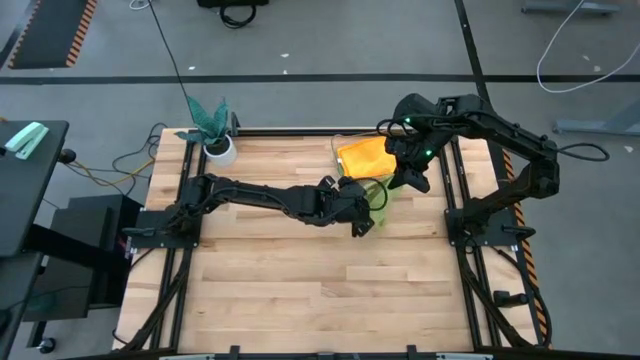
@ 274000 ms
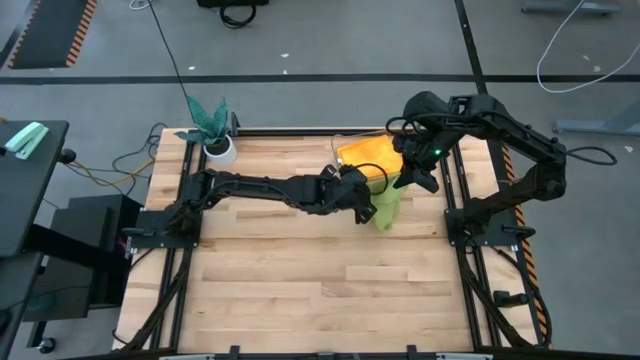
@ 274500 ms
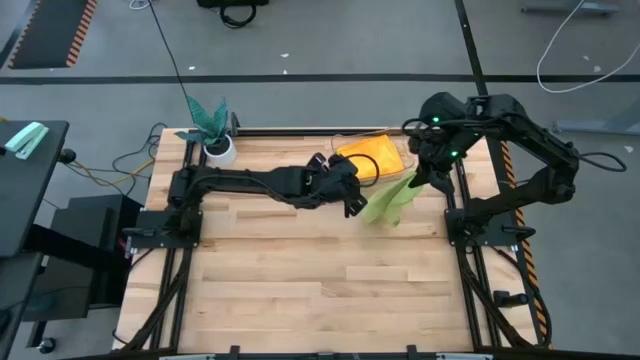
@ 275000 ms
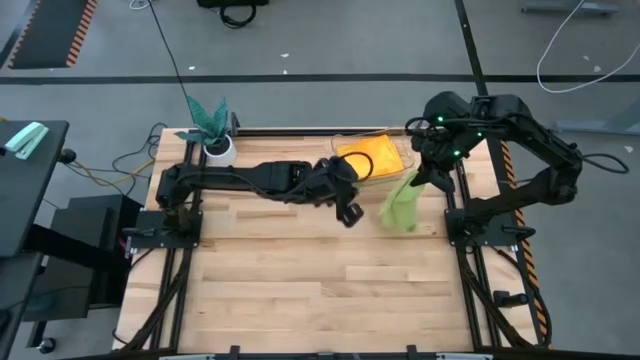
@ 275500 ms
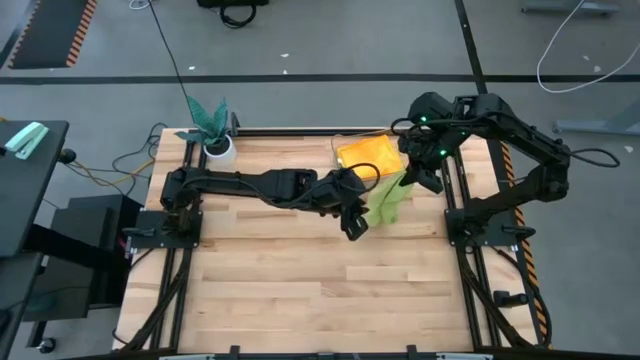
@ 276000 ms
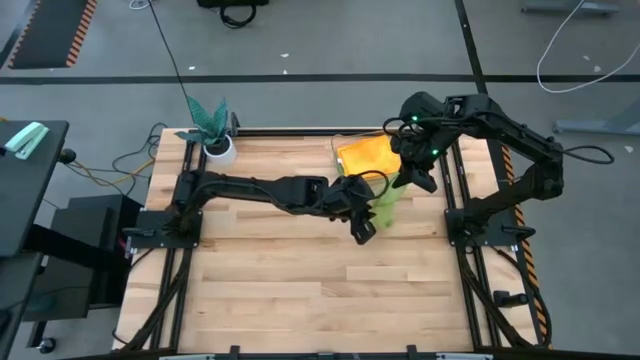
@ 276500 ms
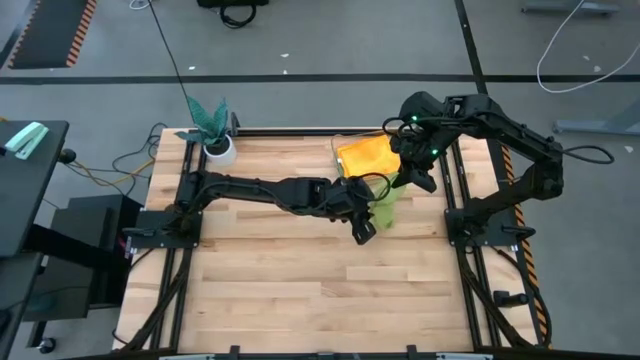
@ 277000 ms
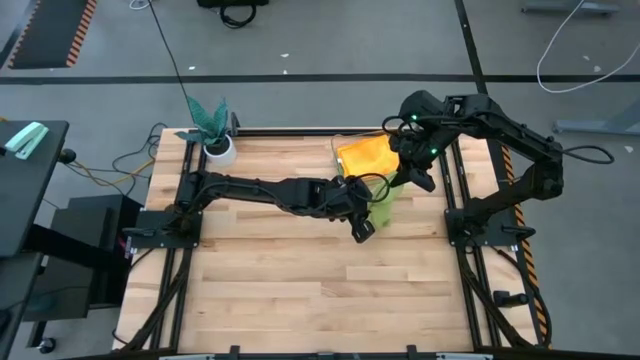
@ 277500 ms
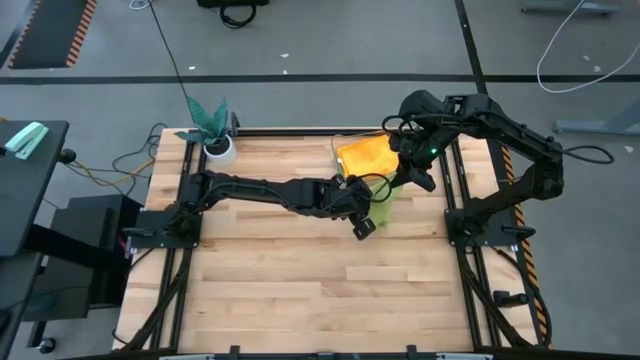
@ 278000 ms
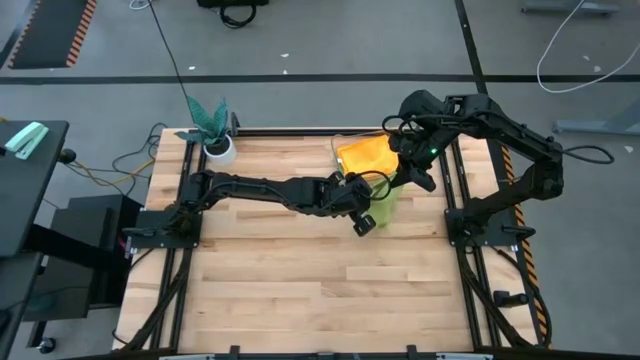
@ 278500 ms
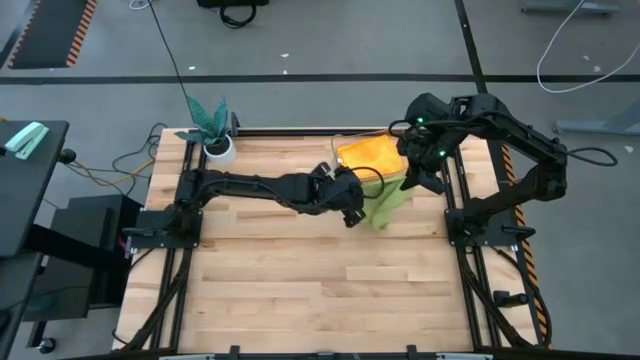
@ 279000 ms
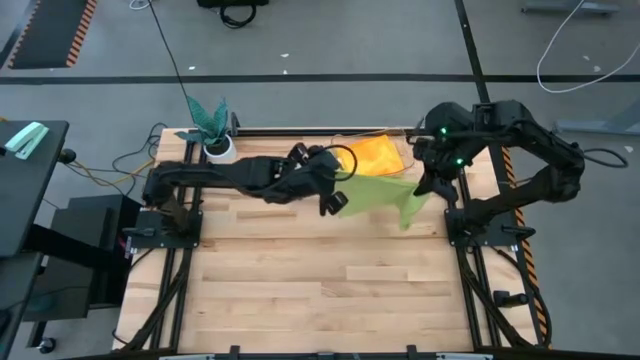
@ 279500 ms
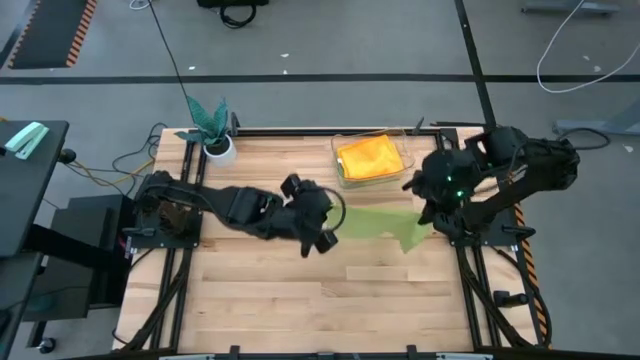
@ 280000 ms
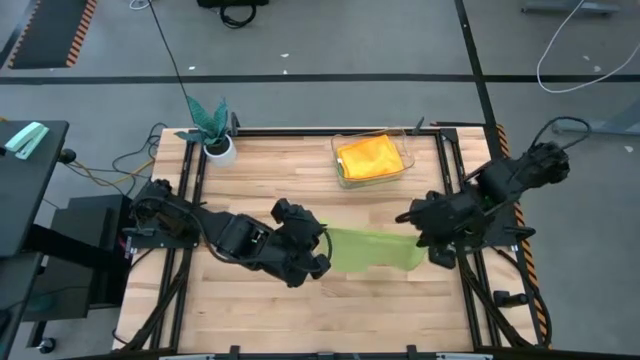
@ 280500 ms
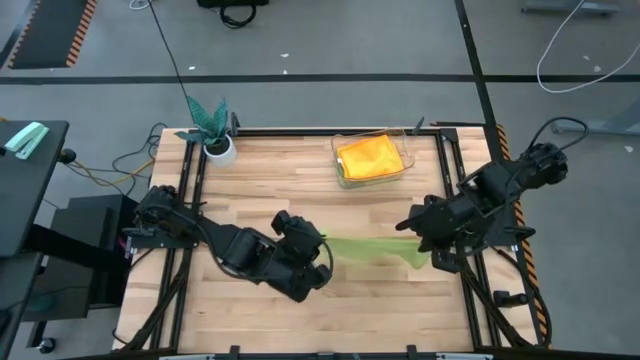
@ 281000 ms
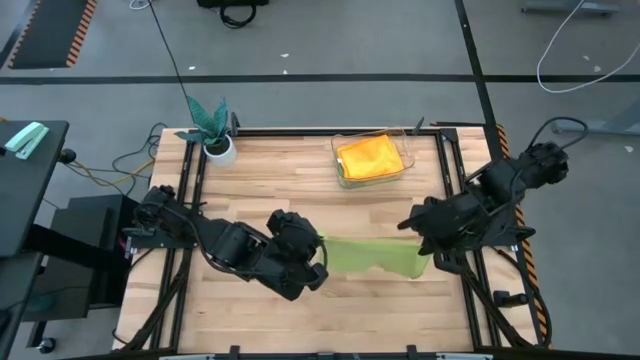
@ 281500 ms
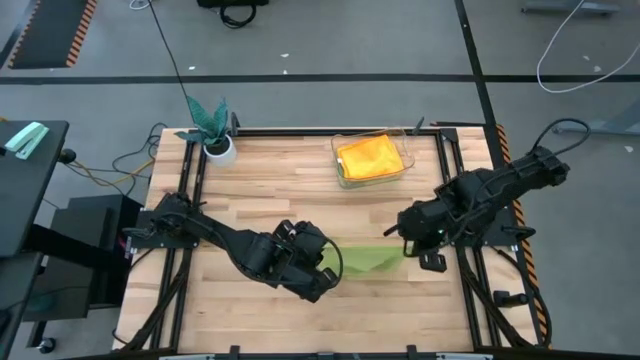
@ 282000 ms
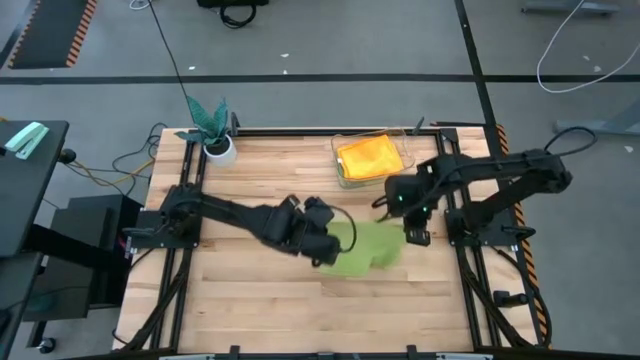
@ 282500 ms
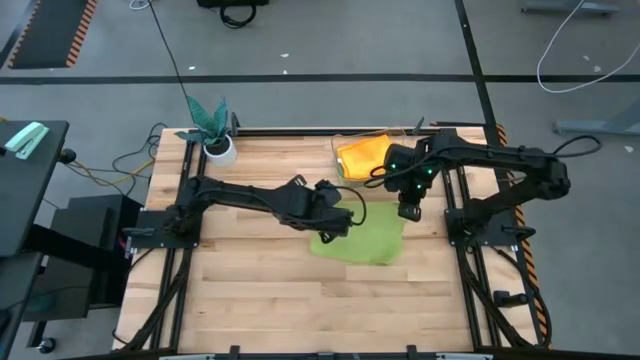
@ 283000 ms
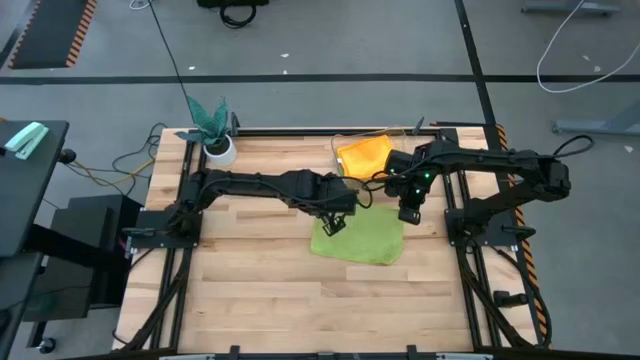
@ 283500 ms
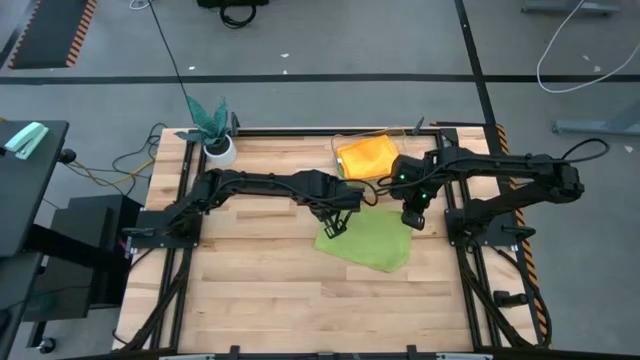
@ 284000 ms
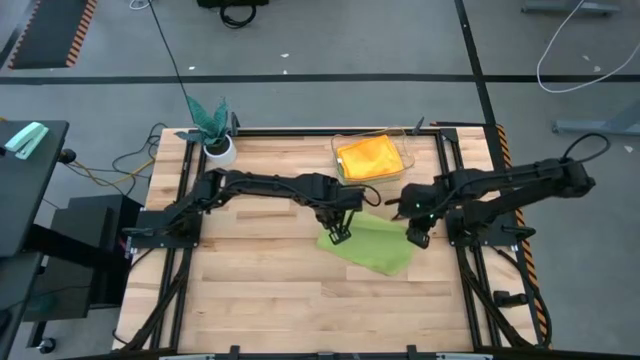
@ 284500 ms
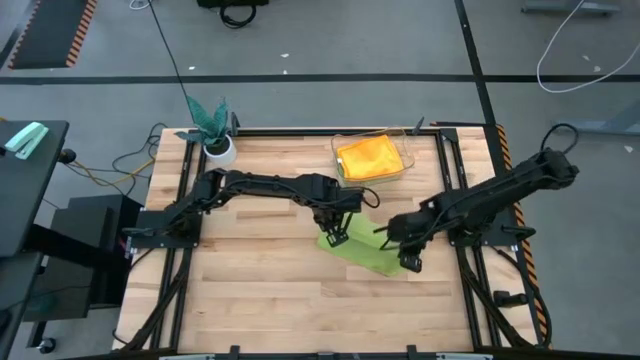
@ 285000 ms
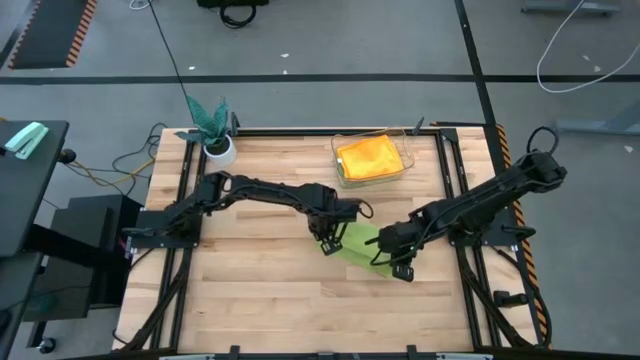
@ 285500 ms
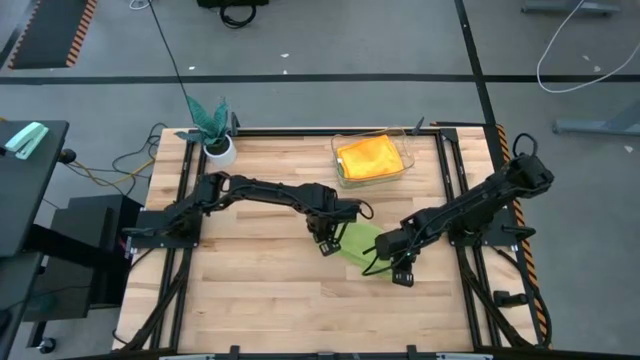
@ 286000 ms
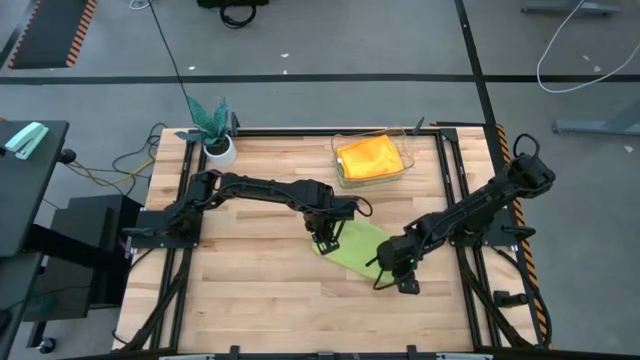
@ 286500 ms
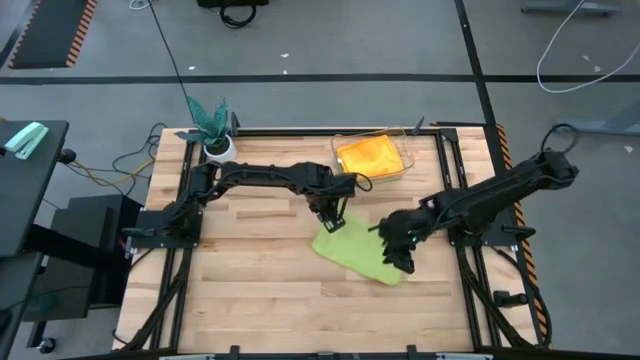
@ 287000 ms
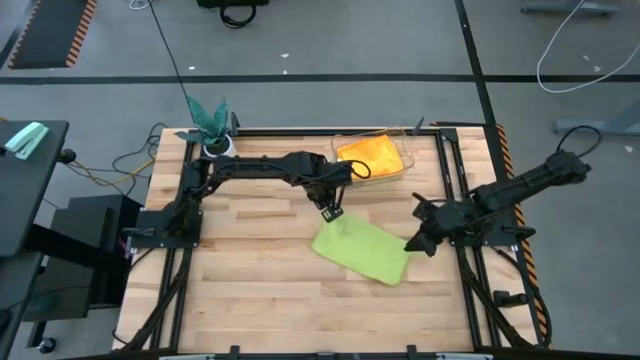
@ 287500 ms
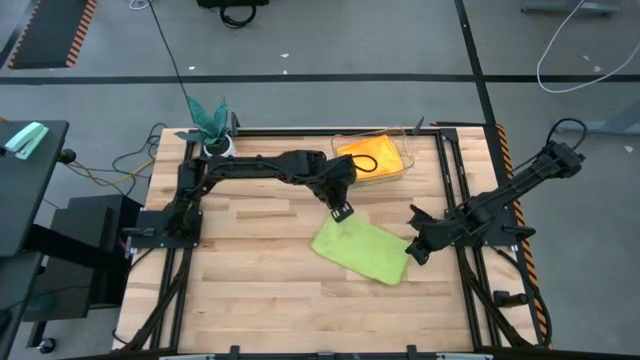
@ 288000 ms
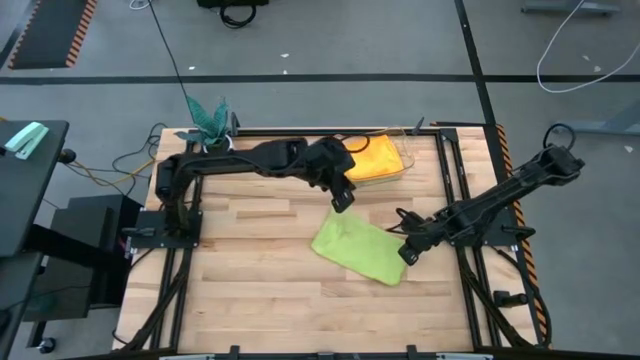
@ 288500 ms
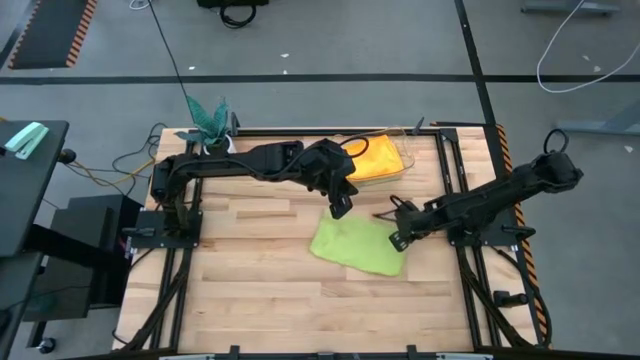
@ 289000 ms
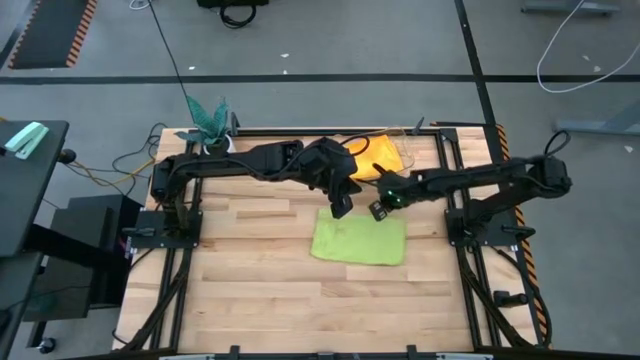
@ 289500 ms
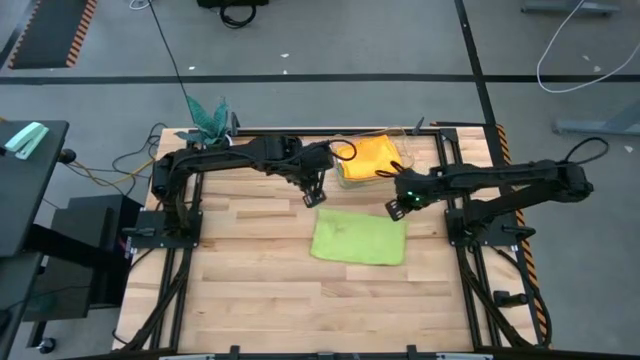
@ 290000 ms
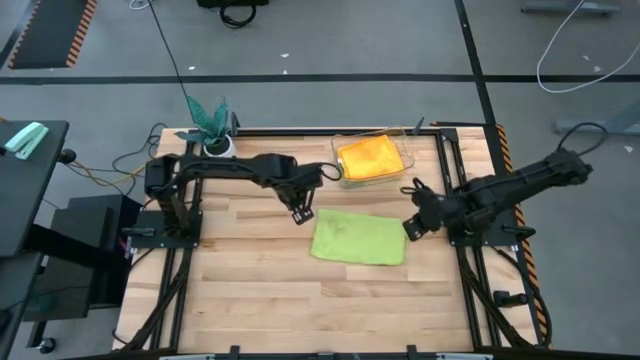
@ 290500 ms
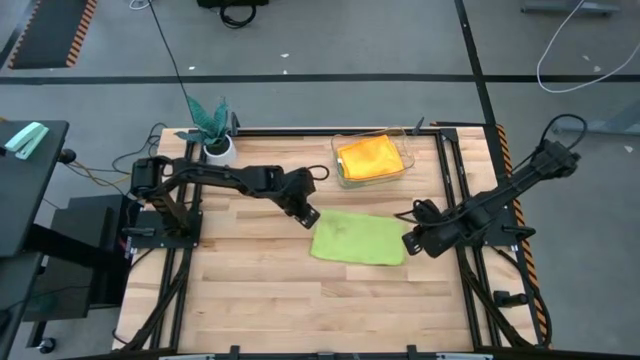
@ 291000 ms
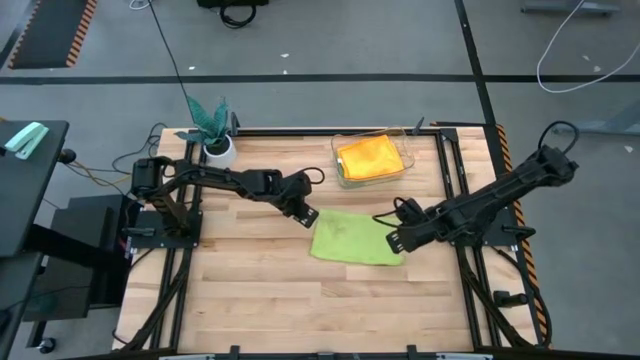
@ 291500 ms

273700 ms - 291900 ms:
Task: Fold microfiber towels
Fold the light green towel

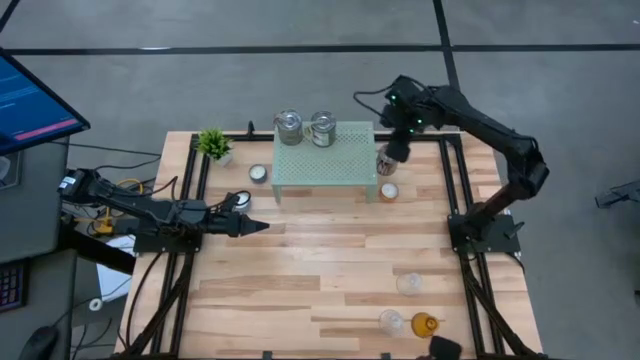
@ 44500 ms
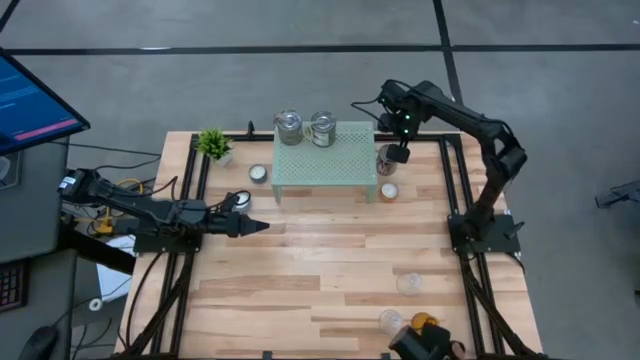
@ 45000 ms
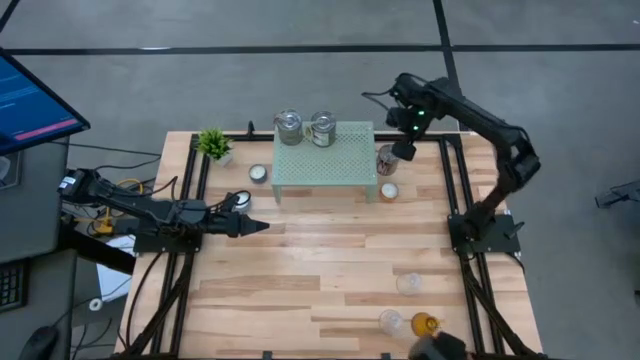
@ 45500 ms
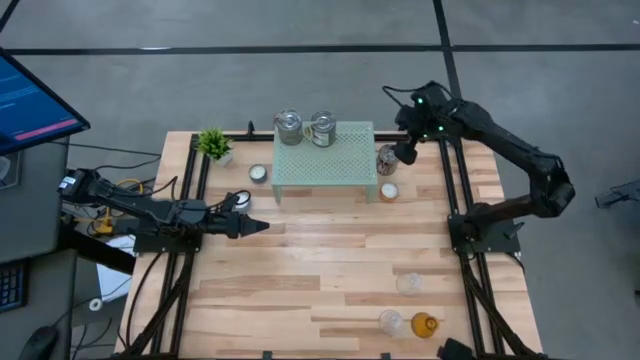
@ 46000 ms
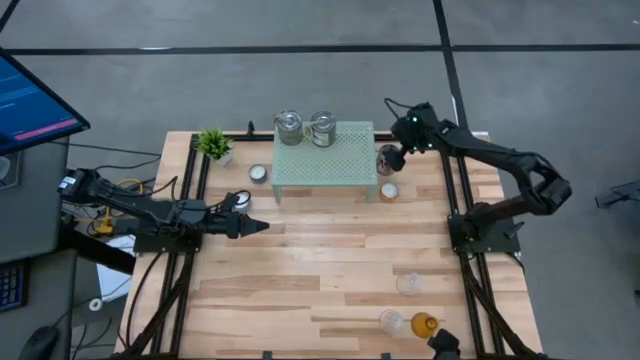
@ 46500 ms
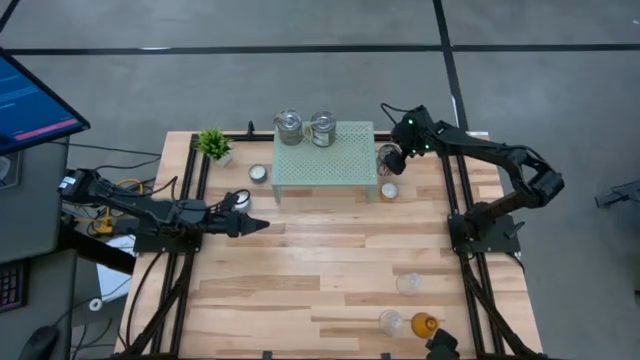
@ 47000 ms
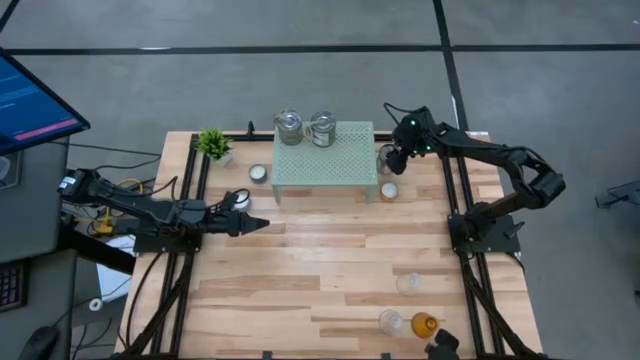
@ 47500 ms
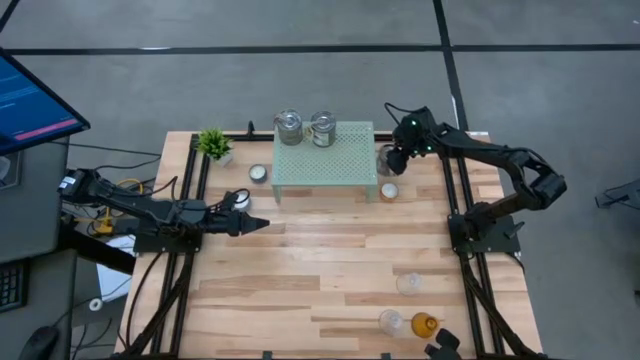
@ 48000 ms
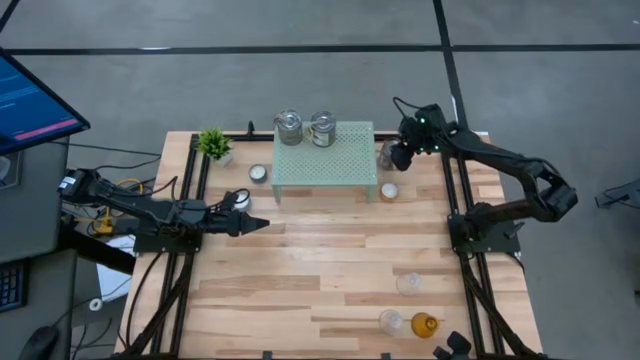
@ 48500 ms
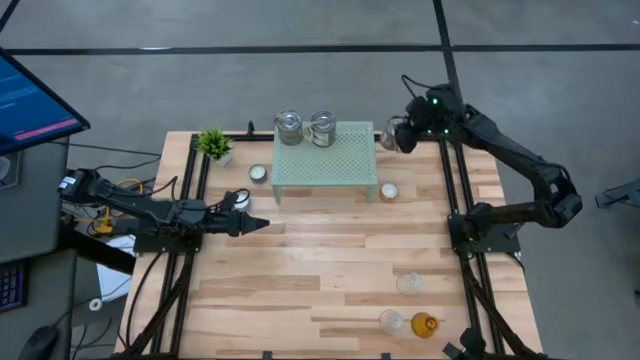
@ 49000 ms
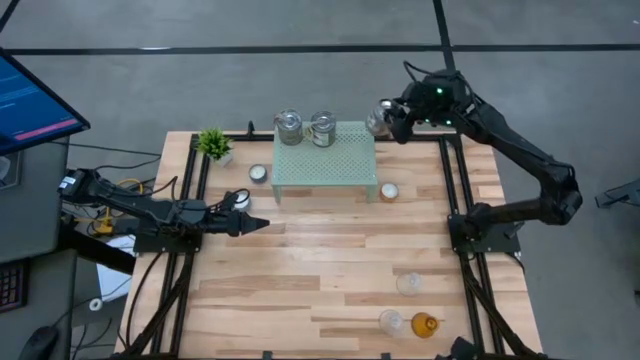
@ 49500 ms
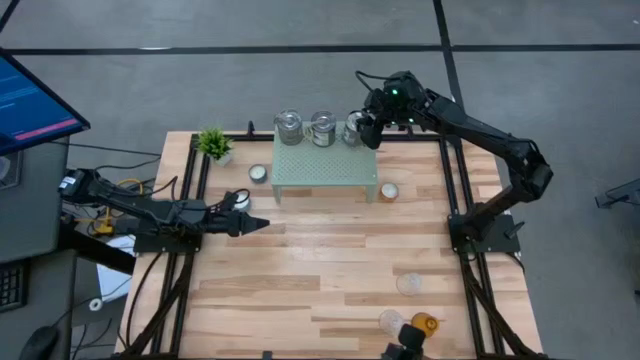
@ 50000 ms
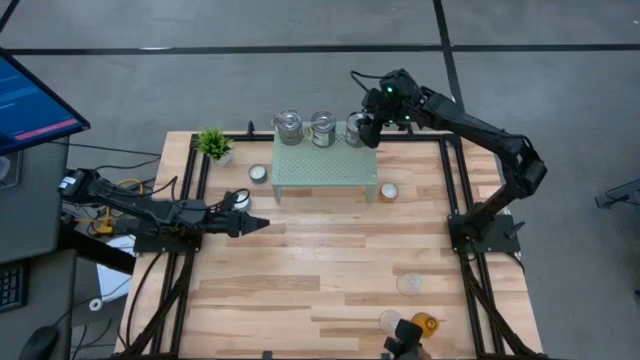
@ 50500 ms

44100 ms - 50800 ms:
Task: Pick & Place candle stick holders
Put the silver scented candle on the shelf aligned with the other silver scented candle
